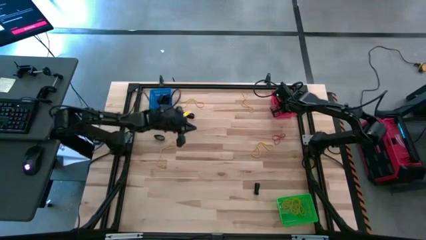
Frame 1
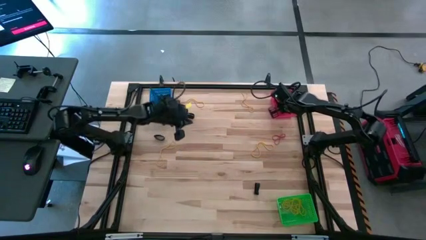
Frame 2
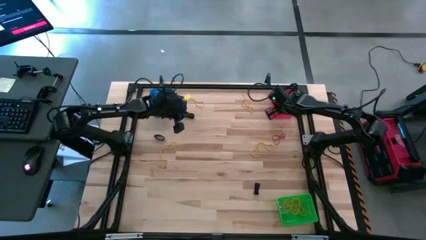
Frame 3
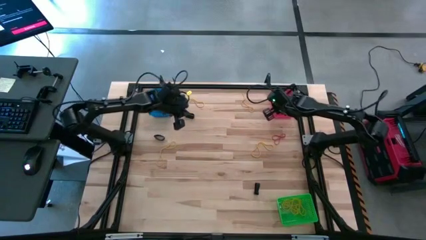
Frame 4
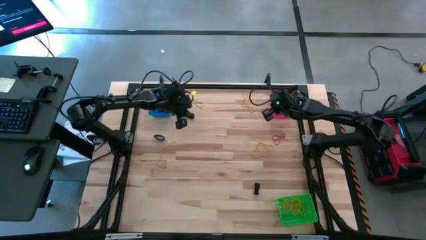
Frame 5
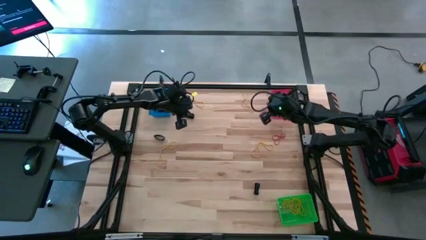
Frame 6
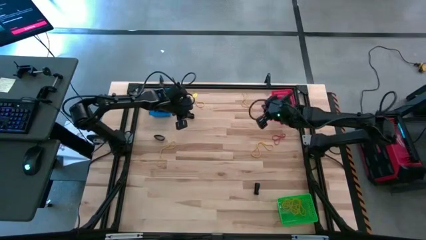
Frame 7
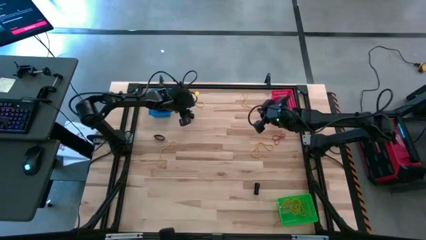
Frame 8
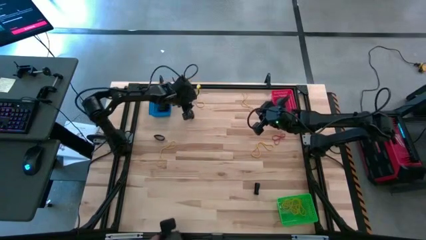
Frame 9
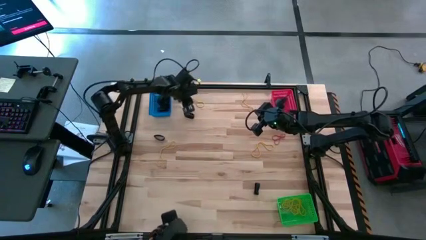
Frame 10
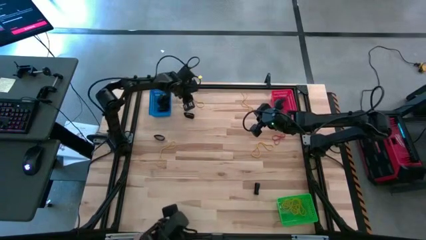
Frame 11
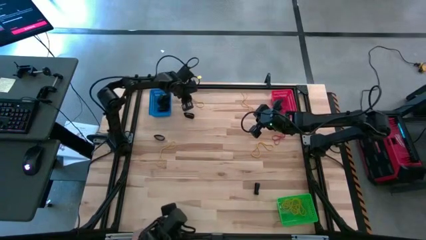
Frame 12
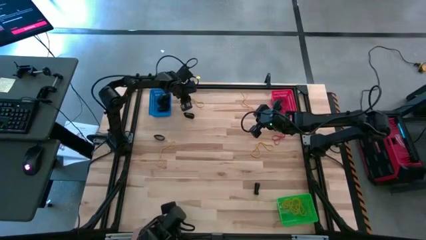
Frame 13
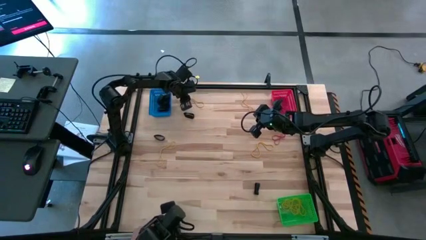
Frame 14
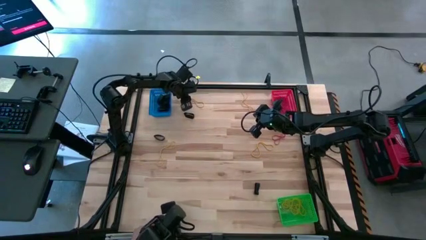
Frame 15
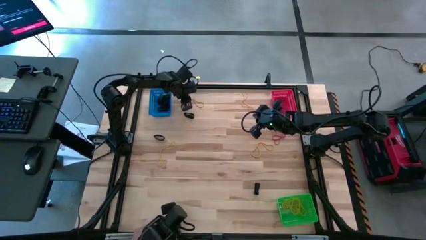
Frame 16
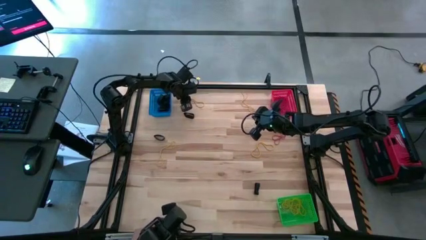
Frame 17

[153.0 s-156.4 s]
Task: Sort rubber bands into baskets
Put the yellow rubber band into the green bin

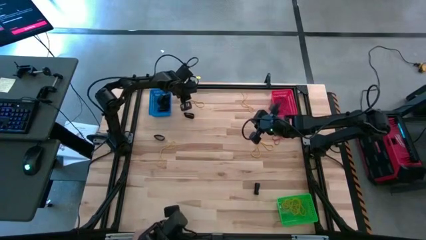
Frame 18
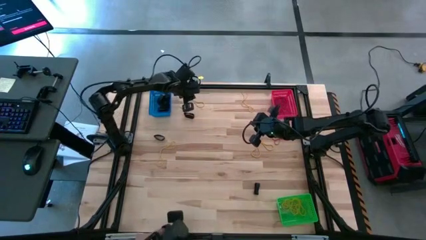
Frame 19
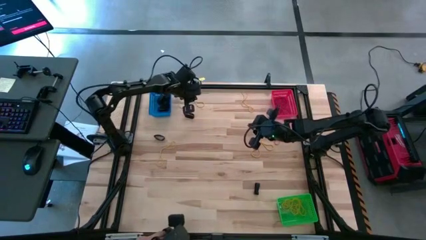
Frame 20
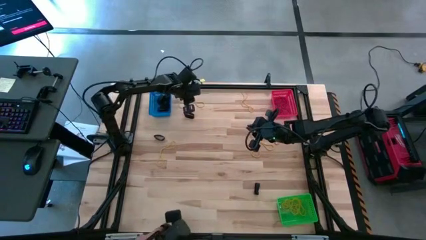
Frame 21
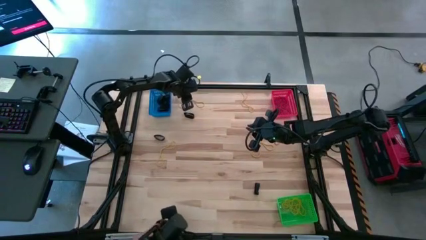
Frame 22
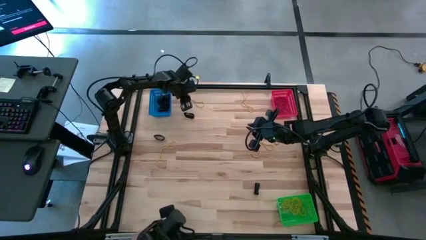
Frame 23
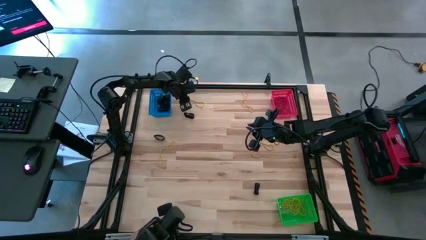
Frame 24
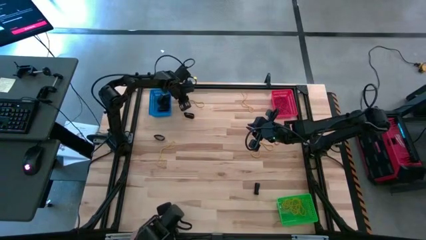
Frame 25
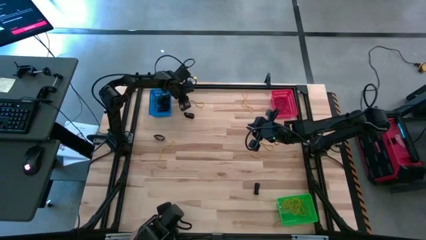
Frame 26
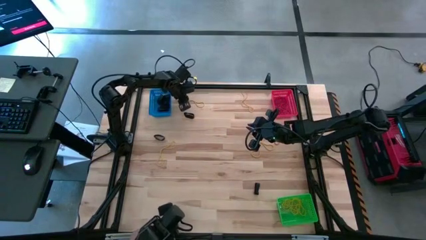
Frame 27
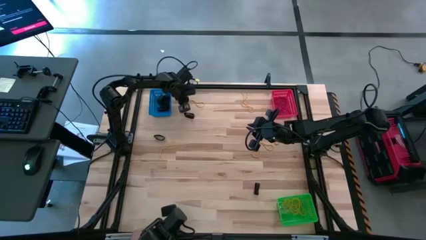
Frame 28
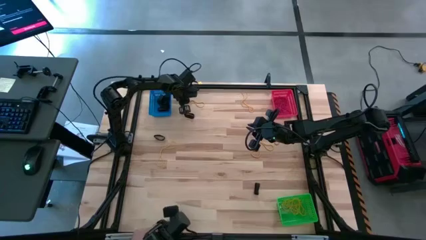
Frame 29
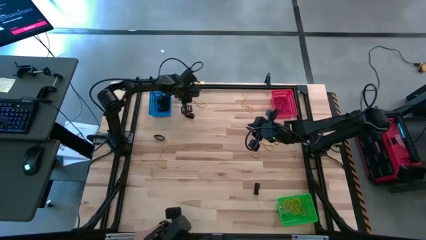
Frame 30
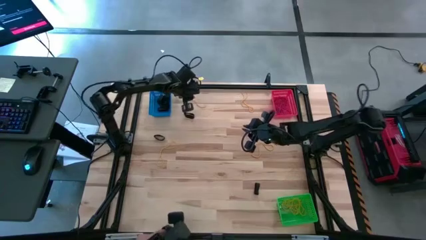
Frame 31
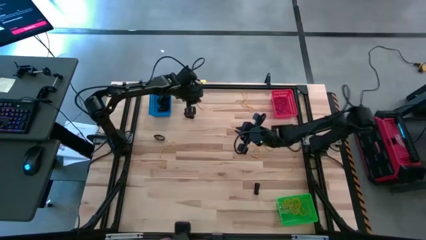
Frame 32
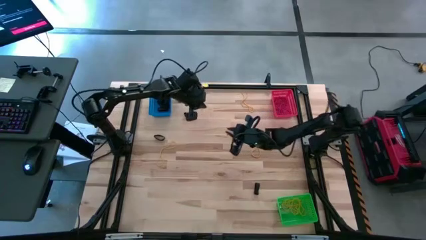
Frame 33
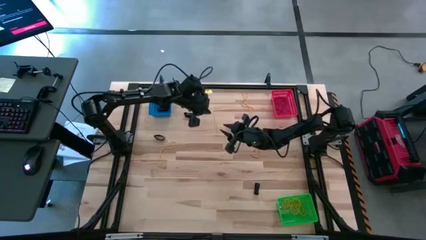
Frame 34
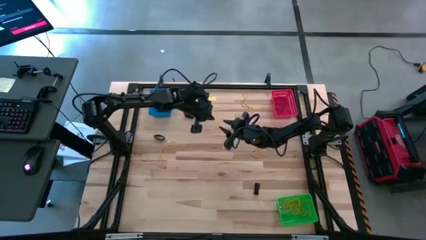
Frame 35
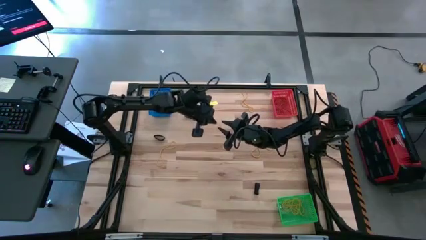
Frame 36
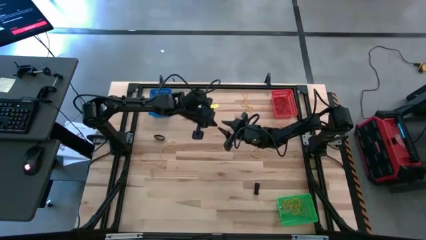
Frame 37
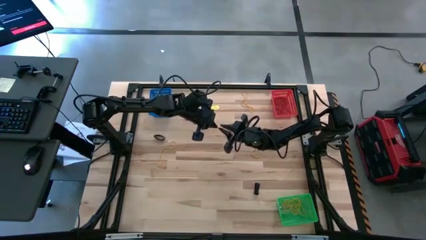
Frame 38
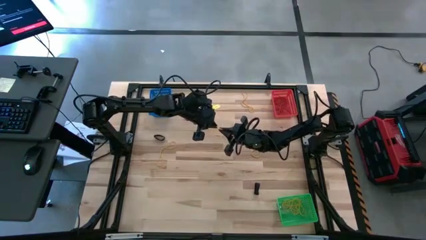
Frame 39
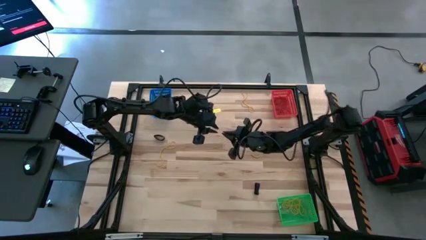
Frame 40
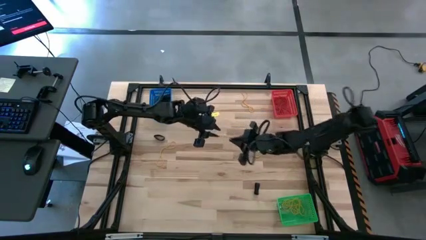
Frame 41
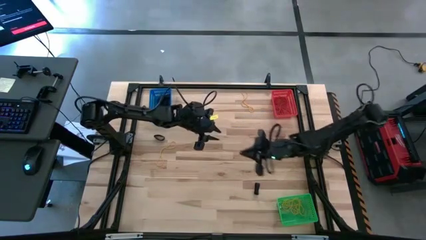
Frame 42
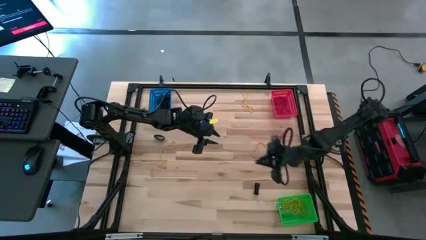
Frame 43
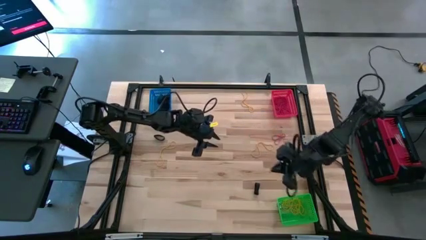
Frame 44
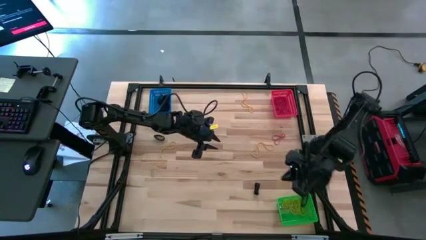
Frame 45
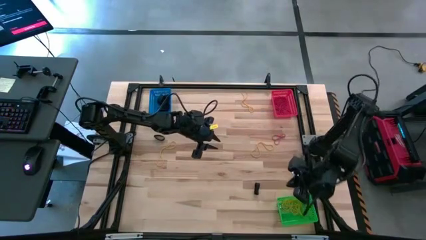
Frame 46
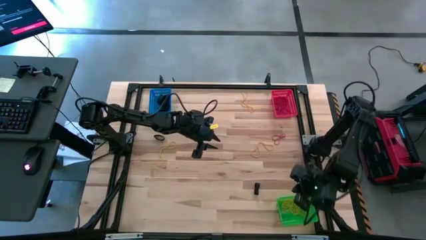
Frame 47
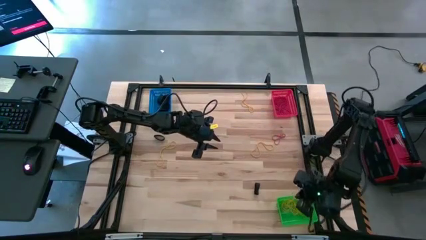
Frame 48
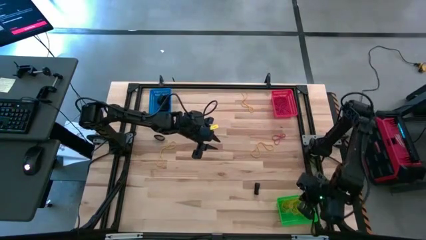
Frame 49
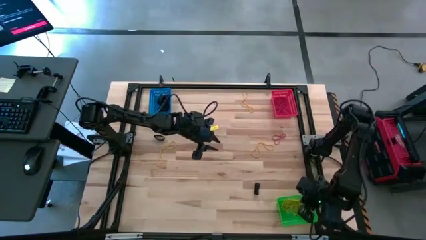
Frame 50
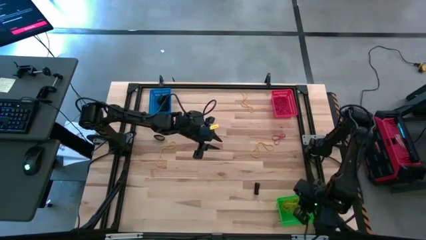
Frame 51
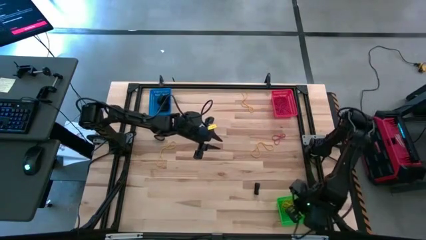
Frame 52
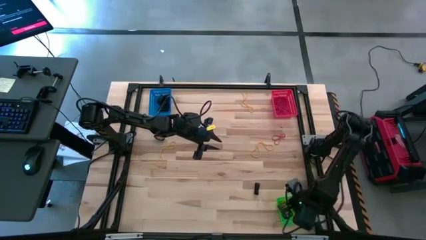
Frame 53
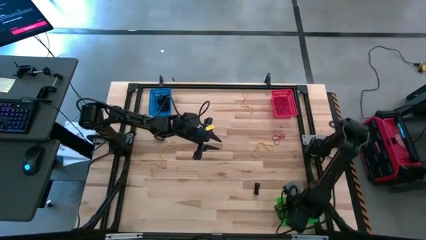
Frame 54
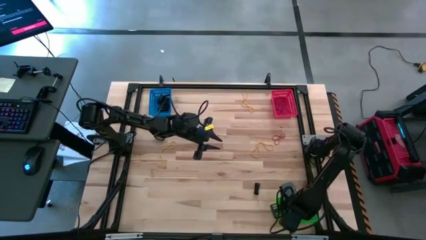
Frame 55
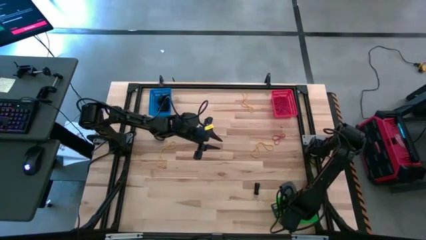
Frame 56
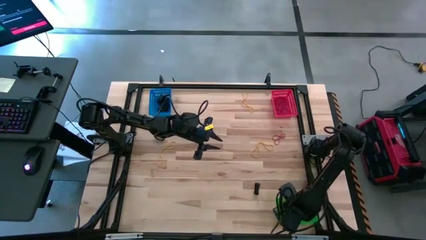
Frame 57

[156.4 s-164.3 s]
Put the yellow rubber band into the green bin

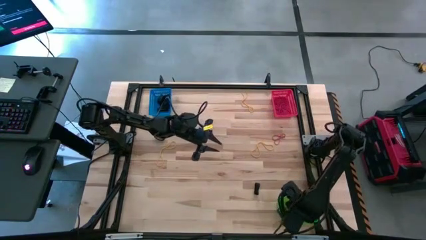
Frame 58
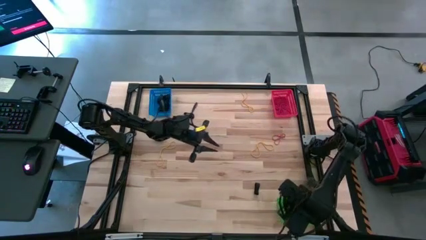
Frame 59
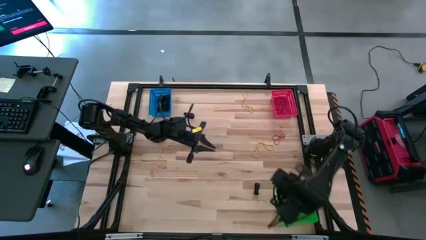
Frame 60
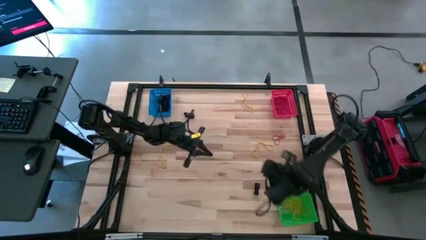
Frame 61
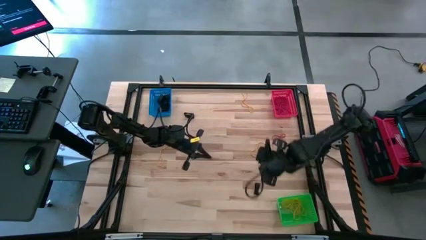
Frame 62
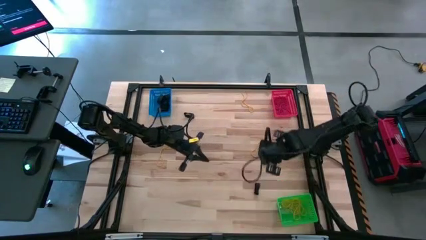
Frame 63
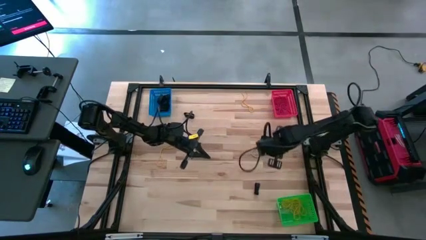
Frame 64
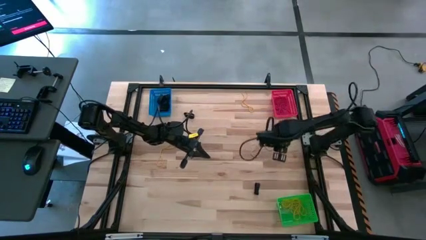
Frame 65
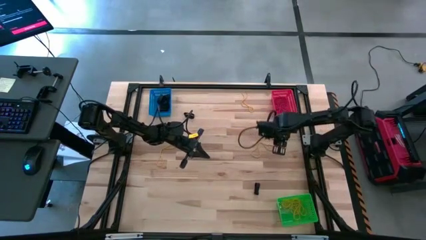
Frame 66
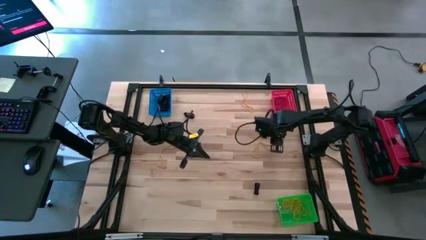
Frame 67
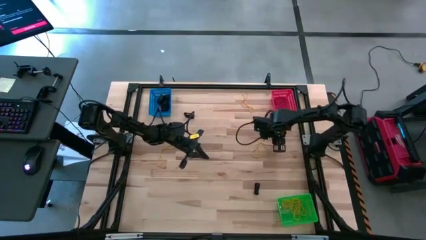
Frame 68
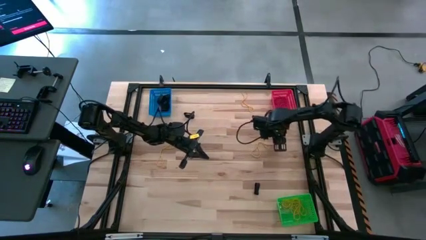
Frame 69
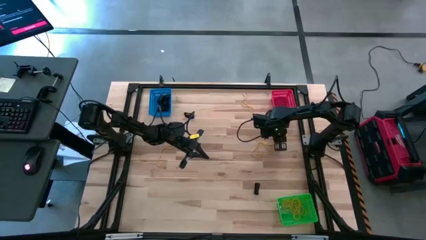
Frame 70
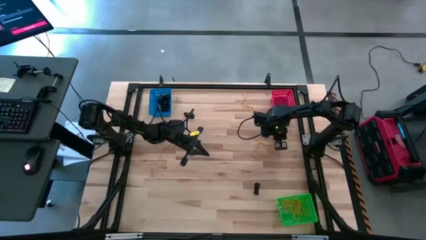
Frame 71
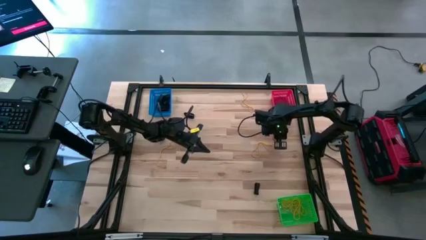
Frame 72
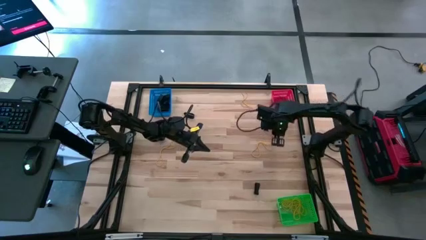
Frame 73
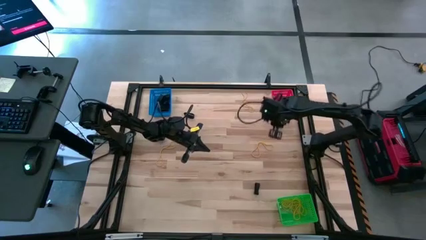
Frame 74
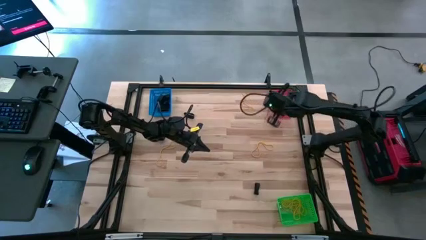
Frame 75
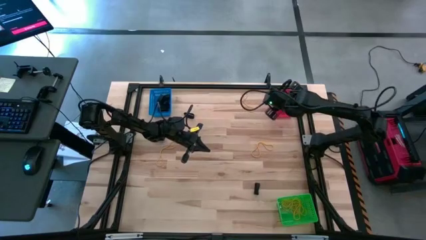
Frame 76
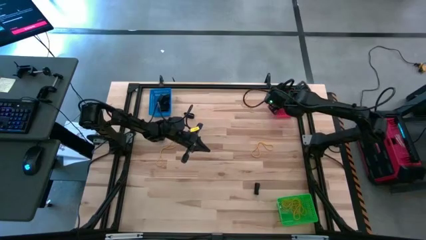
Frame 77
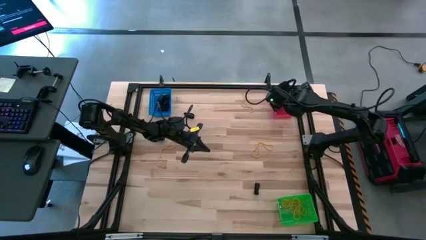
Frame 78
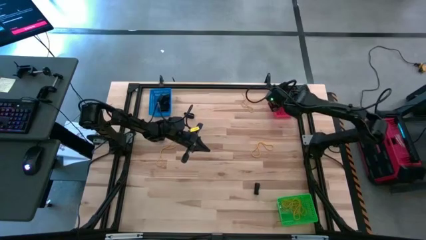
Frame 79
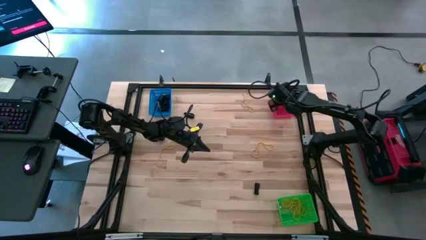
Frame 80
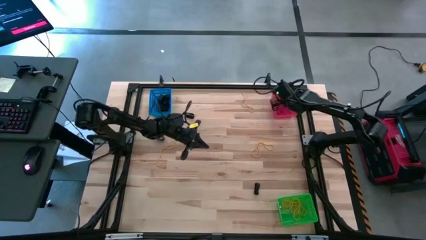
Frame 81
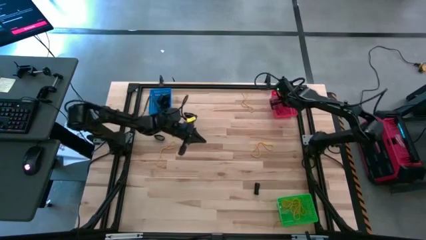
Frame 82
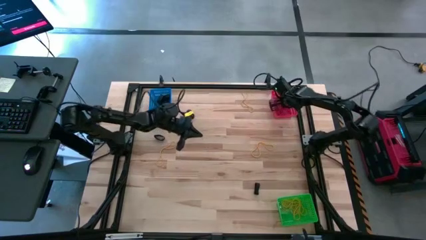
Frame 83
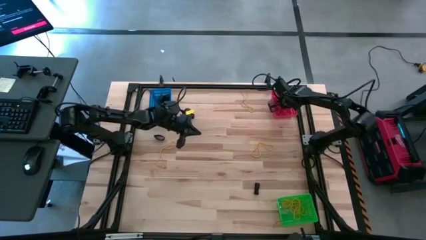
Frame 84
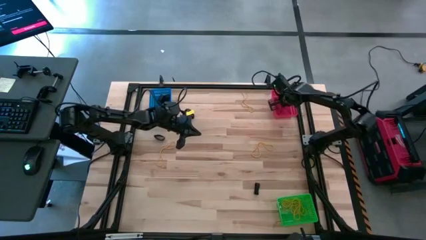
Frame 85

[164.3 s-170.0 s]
Put the red rubber band into the red bin
